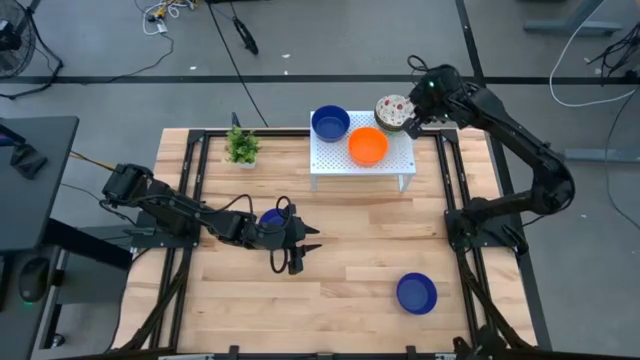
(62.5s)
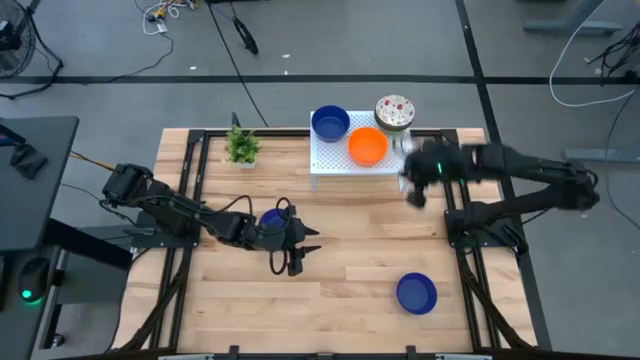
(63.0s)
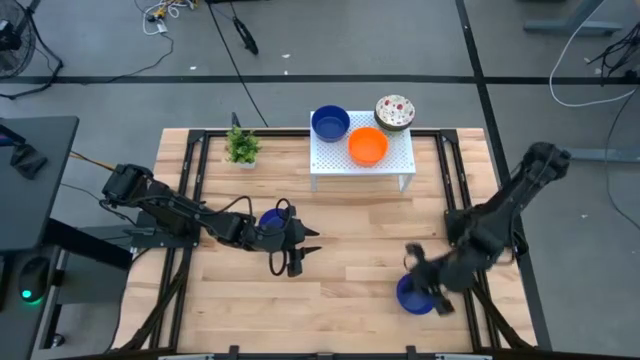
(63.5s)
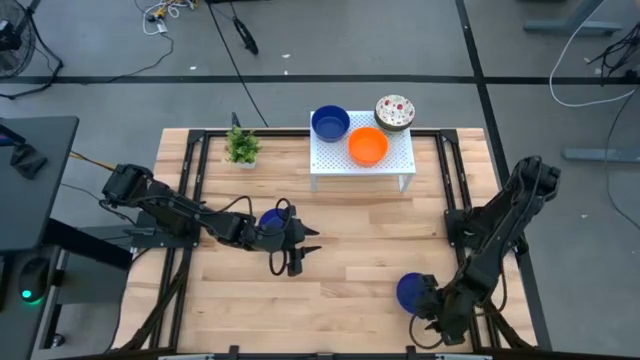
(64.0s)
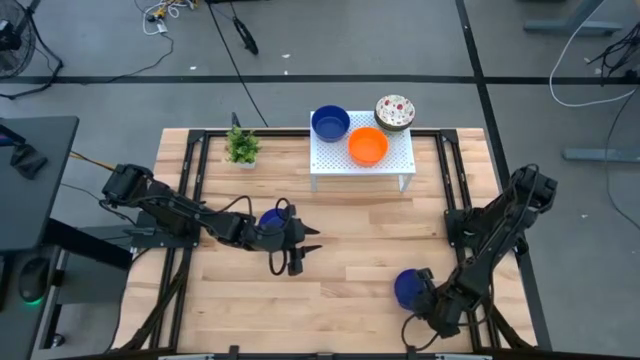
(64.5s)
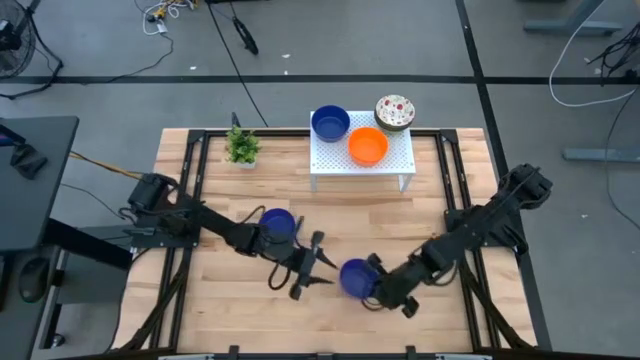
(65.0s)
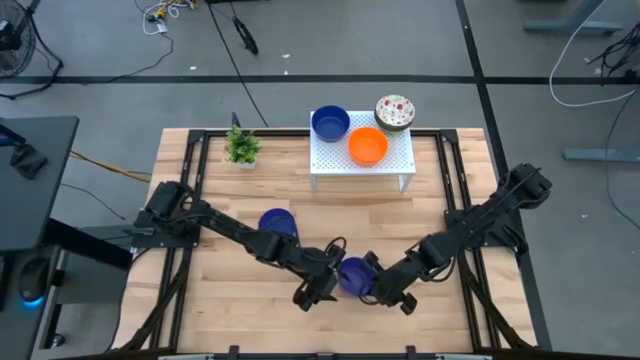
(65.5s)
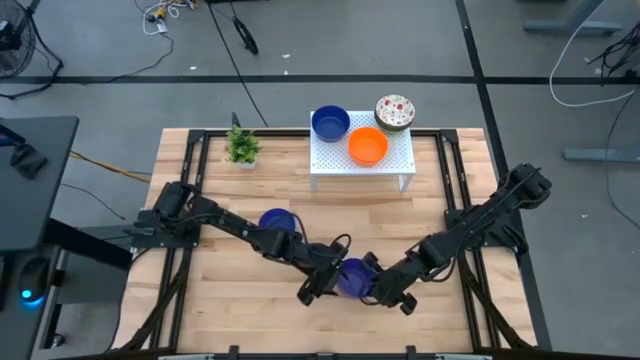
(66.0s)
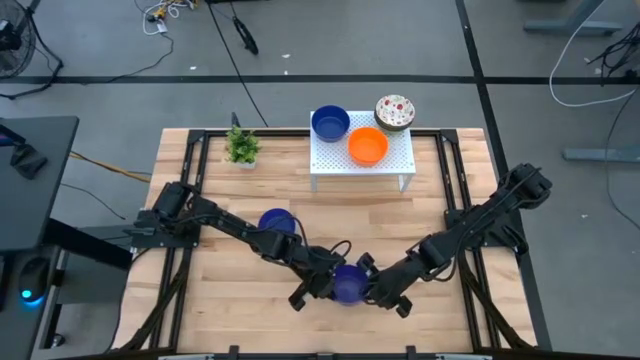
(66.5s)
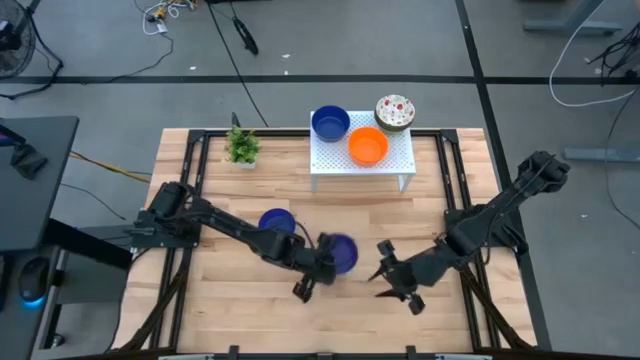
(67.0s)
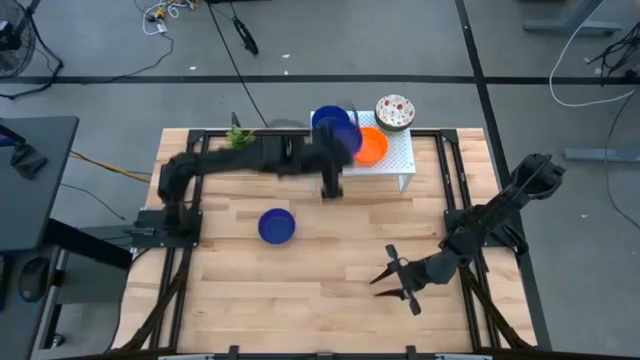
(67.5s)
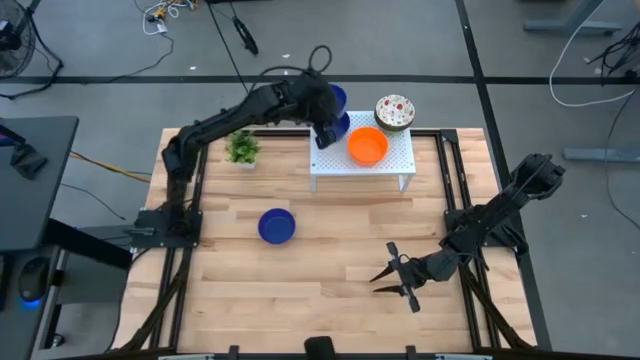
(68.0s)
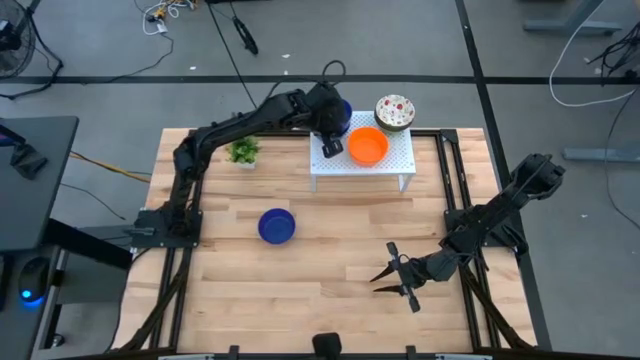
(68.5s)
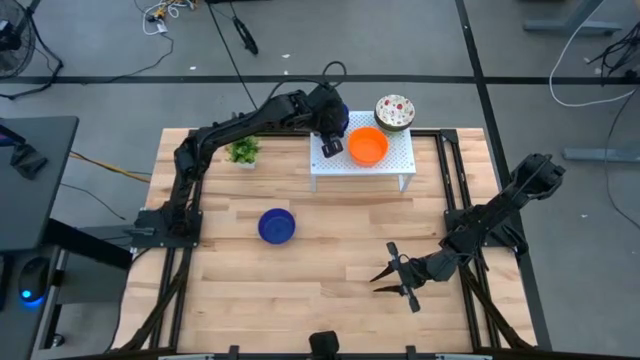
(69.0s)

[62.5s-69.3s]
Task: Pick & Place Mini bowls
Stack the blue bowl on top of the other blue bowls on the shelf

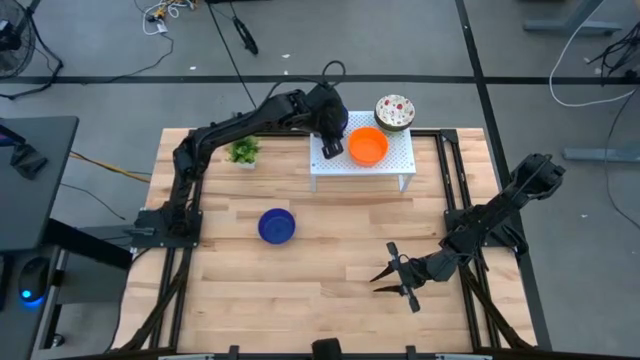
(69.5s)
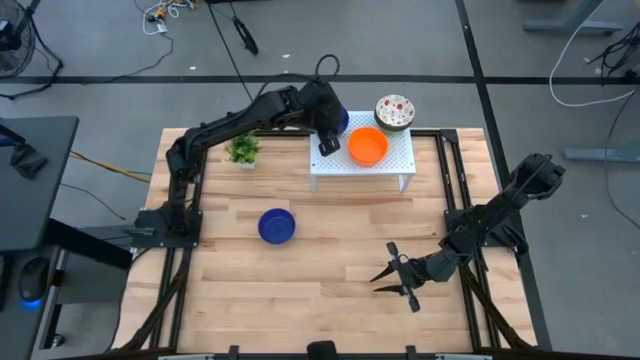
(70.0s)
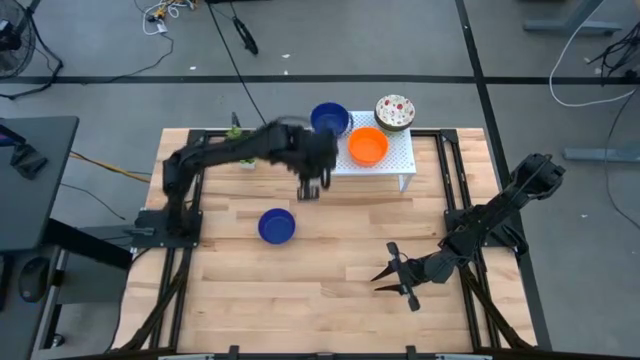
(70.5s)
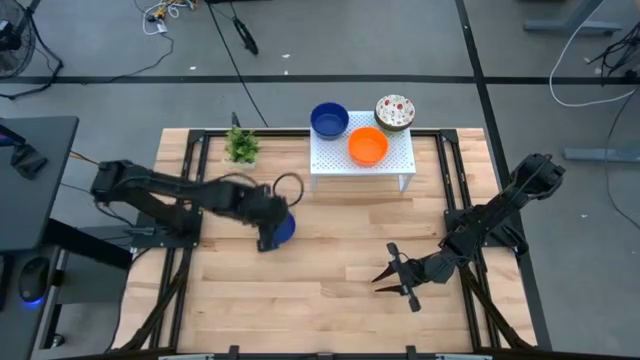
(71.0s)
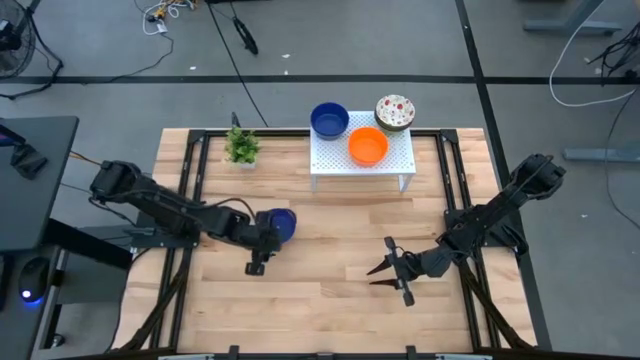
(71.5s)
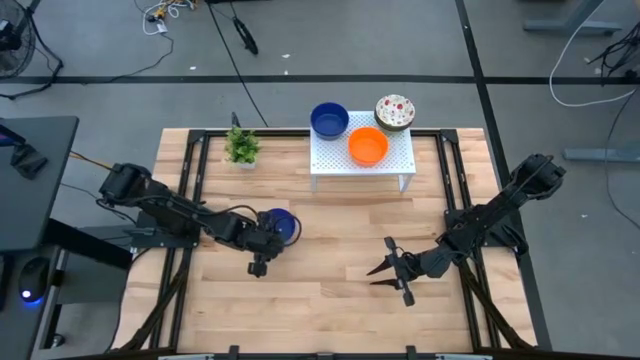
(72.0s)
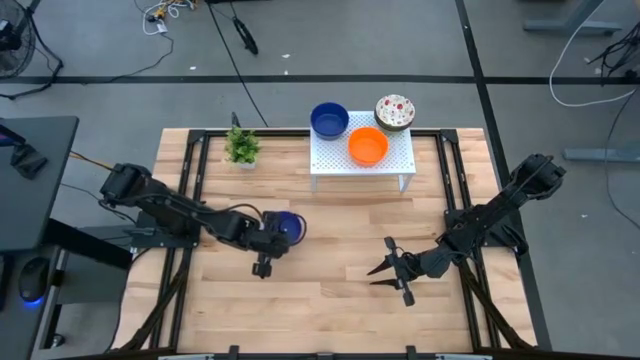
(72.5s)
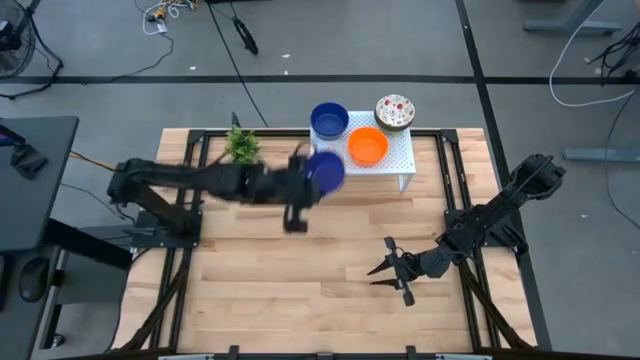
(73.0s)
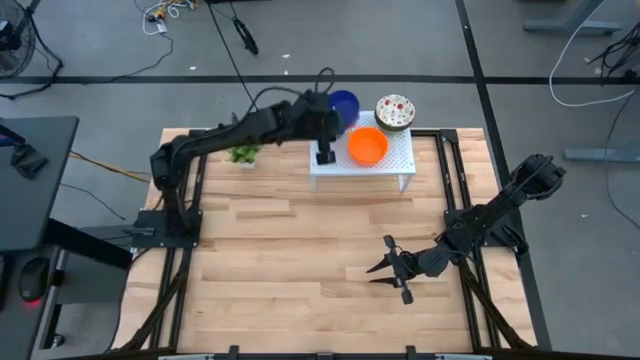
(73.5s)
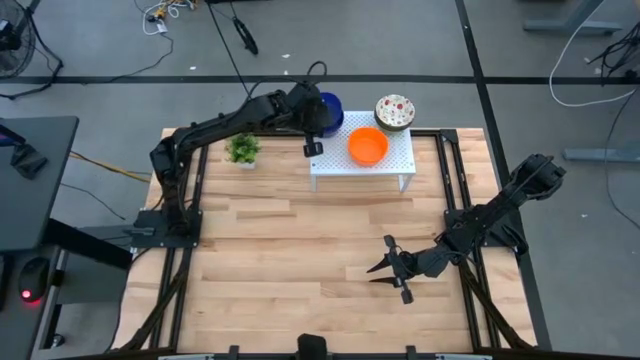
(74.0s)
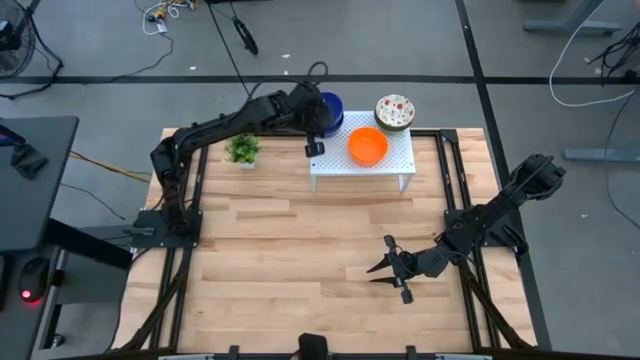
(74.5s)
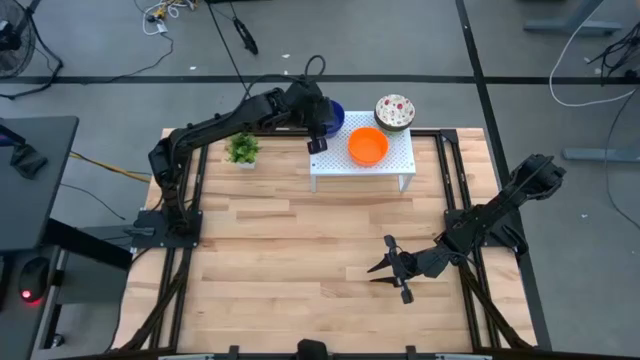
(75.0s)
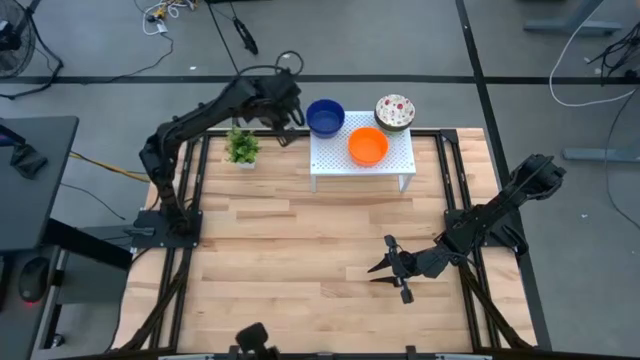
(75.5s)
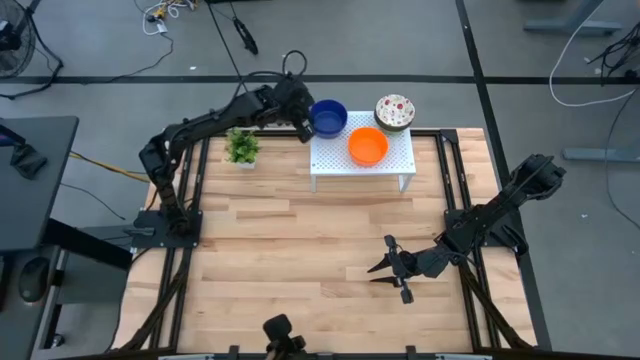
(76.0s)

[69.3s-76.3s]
Stack the blue bowl on top of the other blue bowls on the shelf

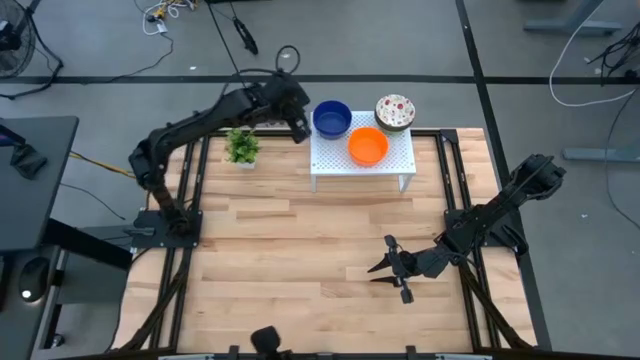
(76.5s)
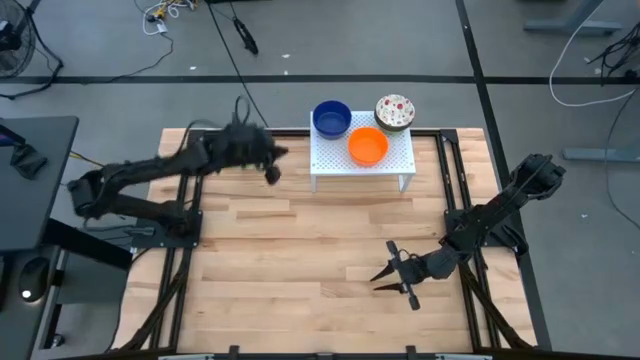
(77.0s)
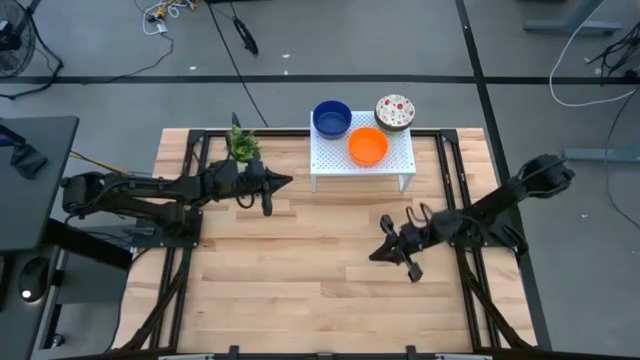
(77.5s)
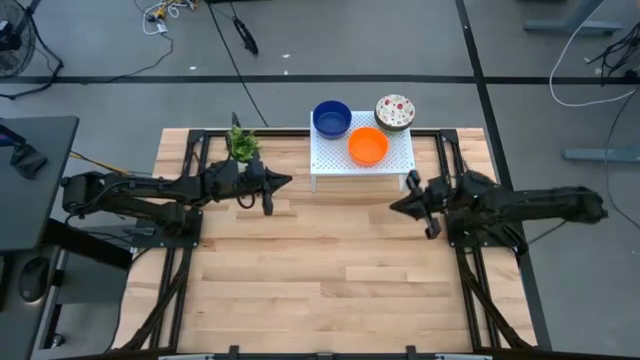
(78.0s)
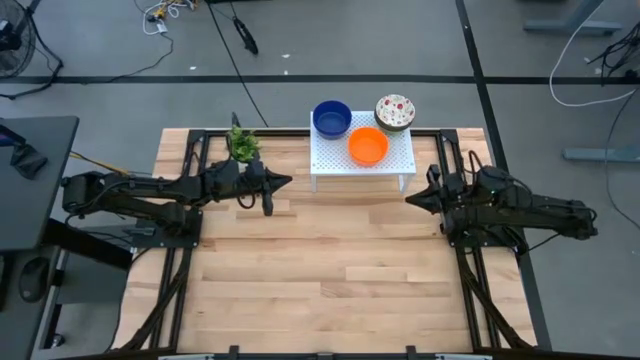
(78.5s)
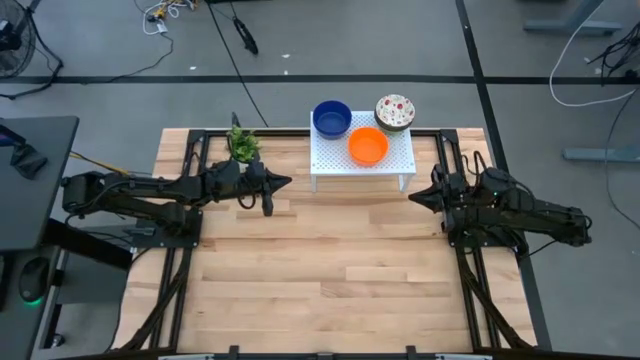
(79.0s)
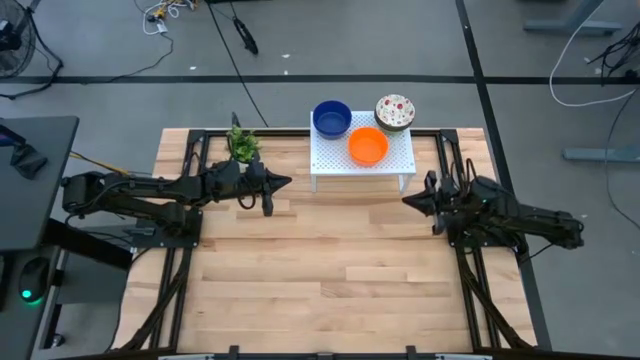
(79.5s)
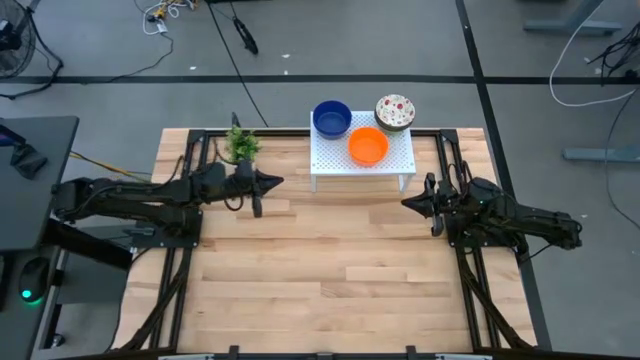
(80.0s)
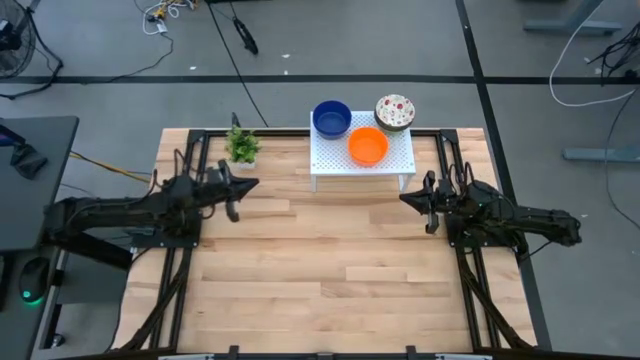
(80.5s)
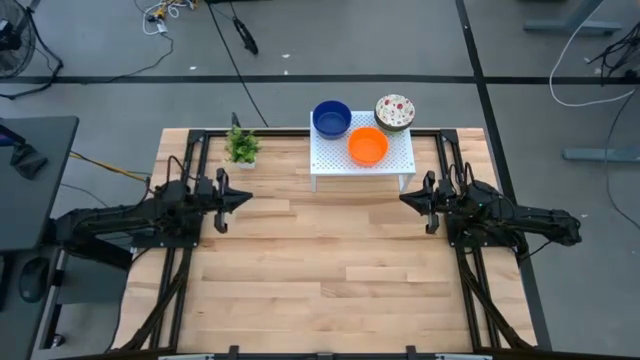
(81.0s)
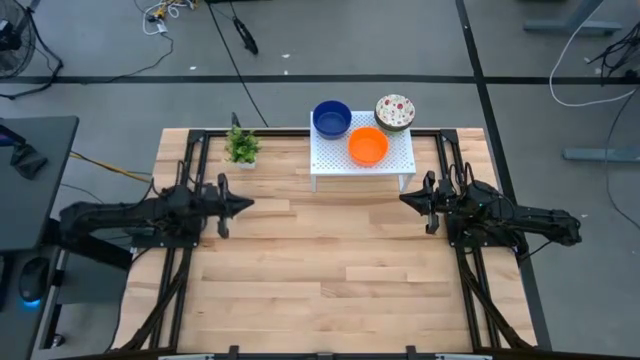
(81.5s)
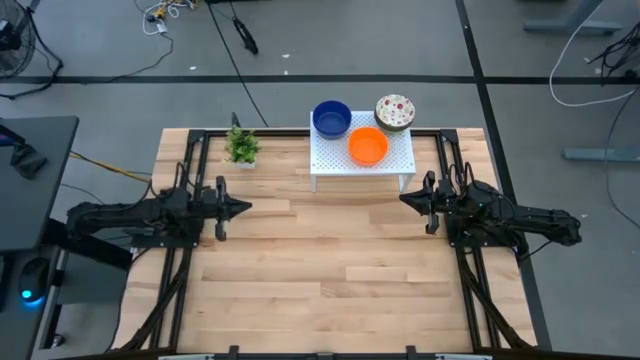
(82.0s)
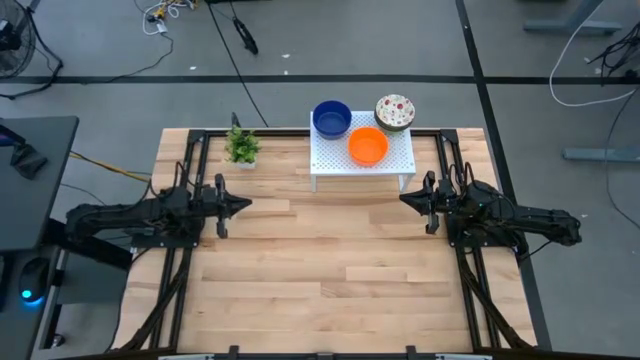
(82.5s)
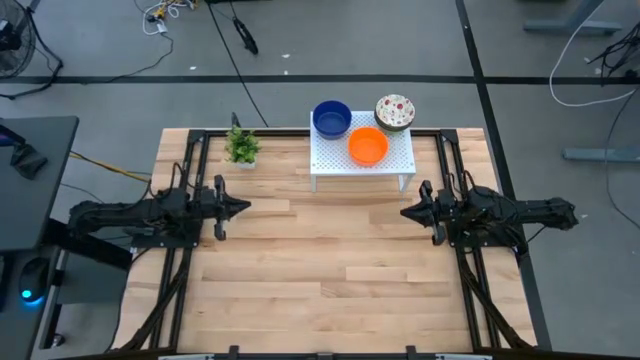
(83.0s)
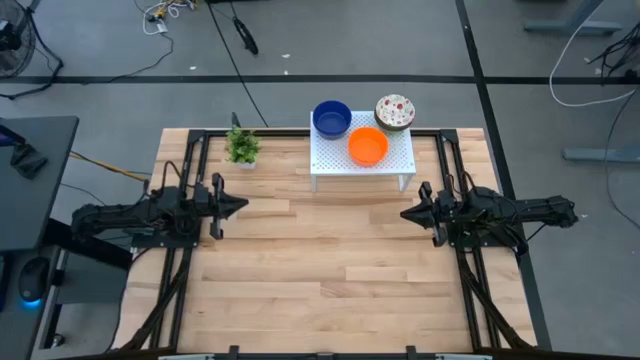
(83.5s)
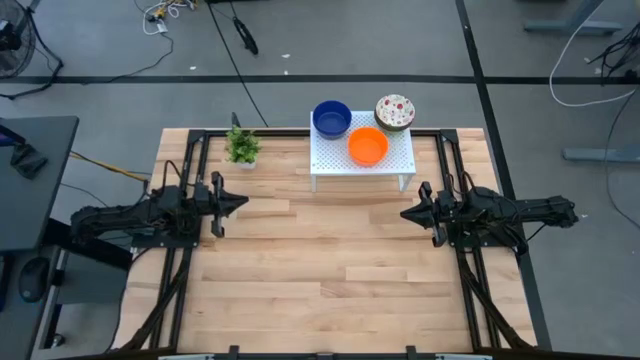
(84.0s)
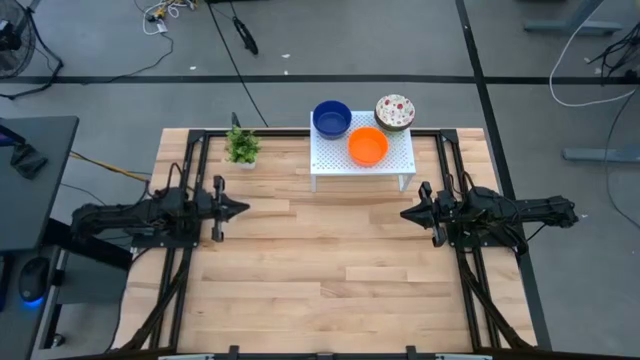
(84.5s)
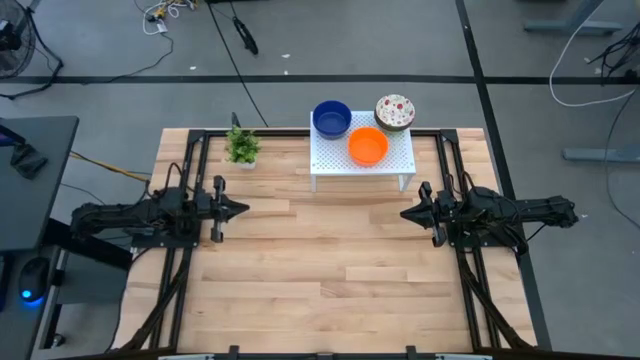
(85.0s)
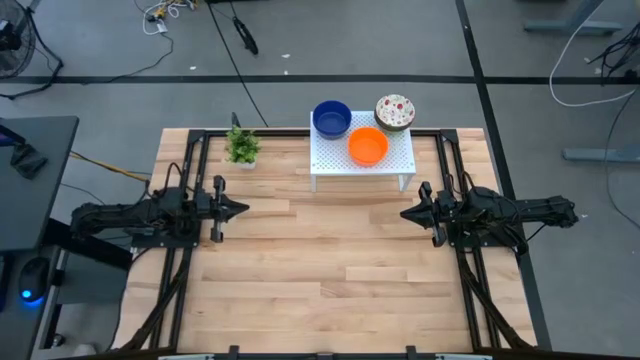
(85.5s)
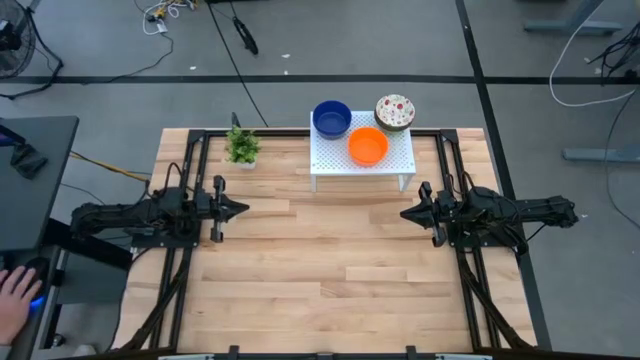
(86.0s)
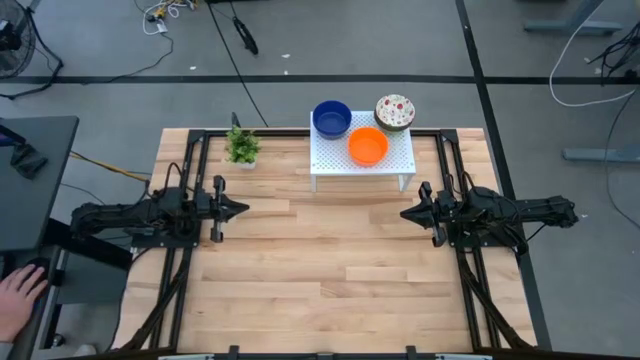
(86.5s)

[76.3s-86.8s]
Return to Home Position
